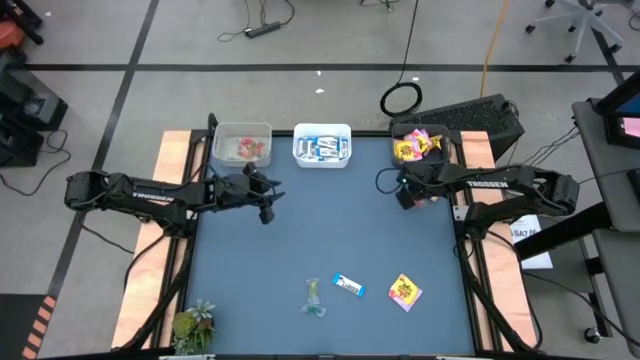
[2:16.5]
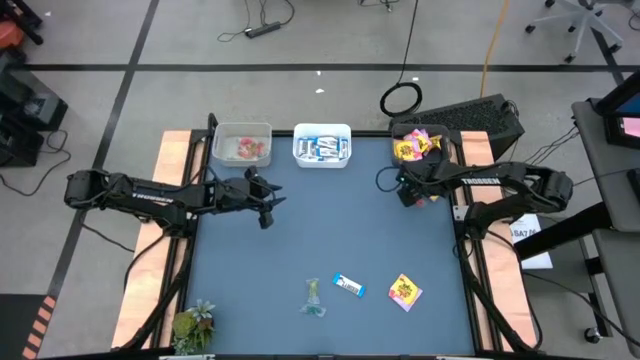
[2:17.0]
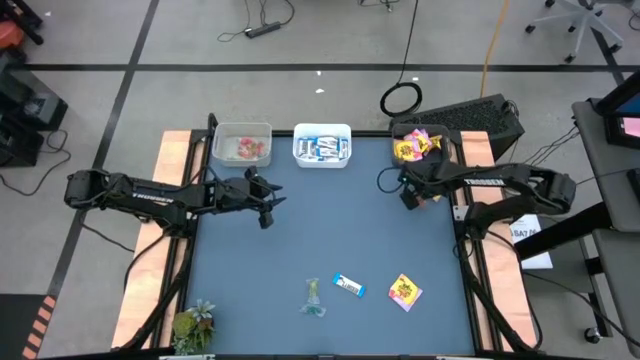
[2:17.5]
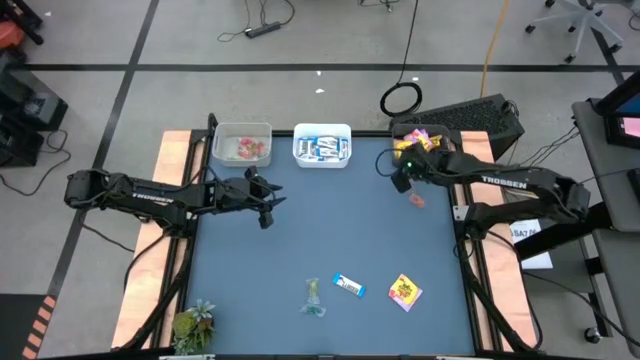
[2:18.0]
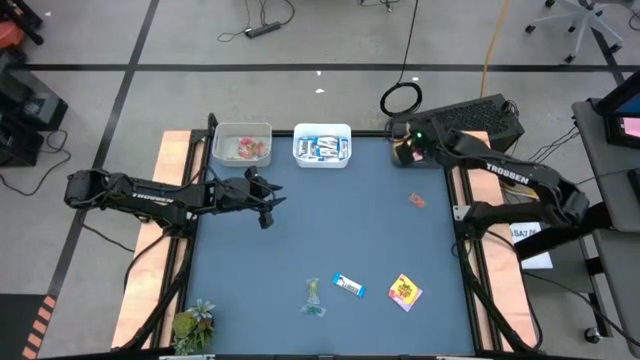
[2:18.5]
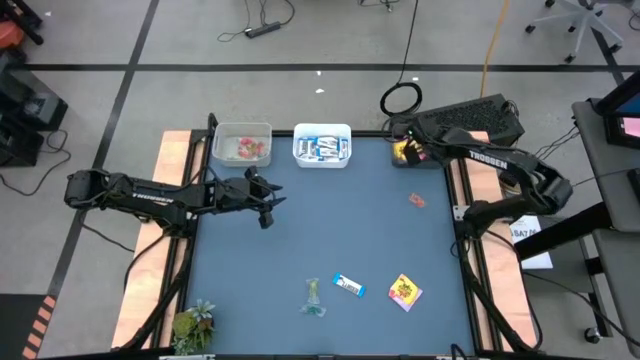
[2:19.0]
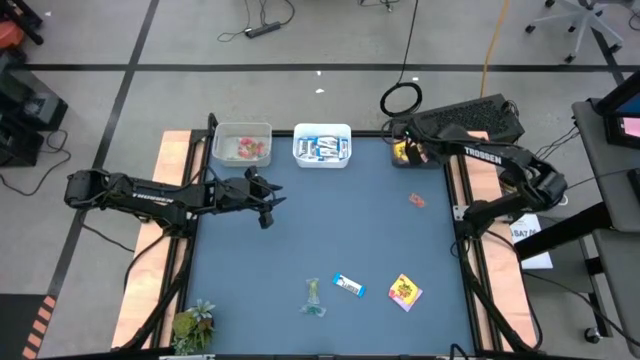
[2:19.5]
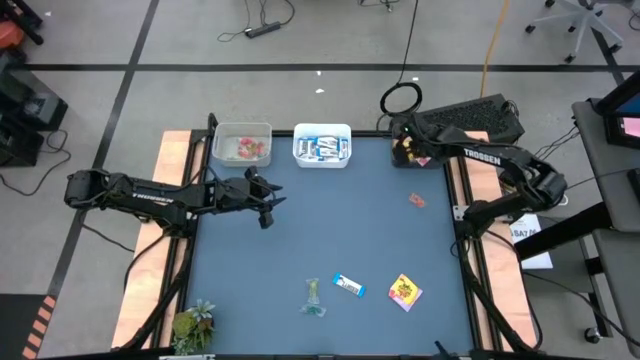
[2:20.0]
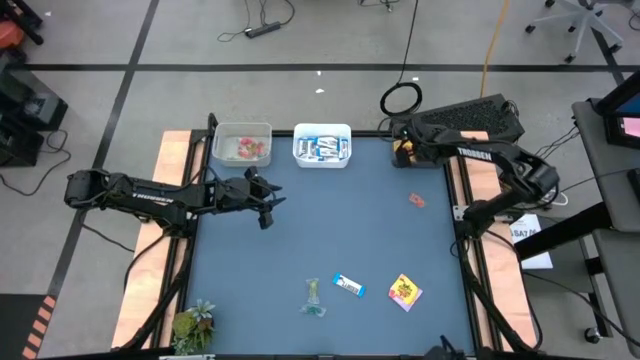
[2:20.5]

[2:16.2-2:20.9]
Task: Sort candy
Put the yellow candy into the black bin

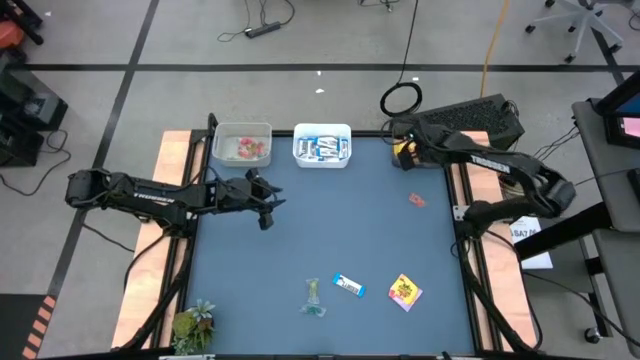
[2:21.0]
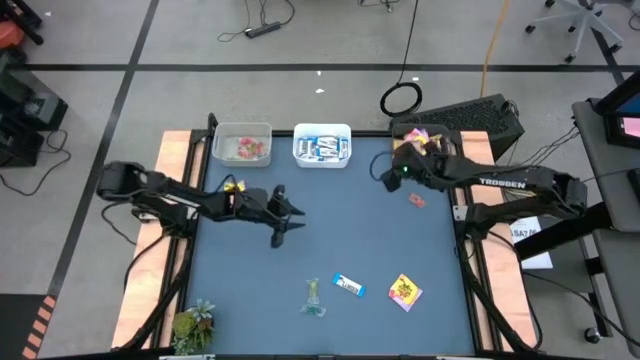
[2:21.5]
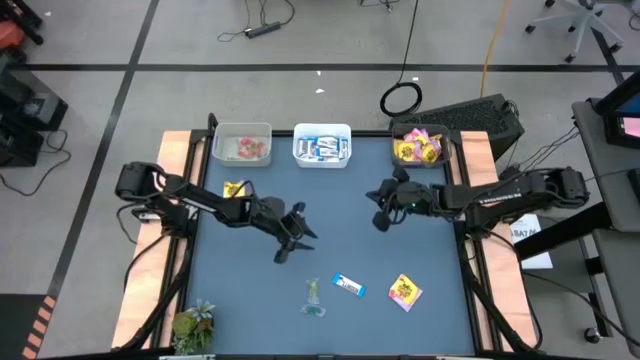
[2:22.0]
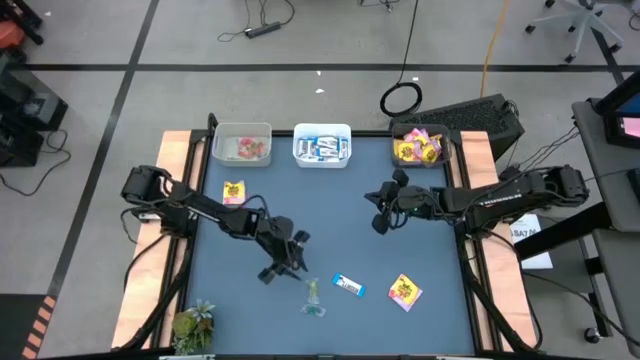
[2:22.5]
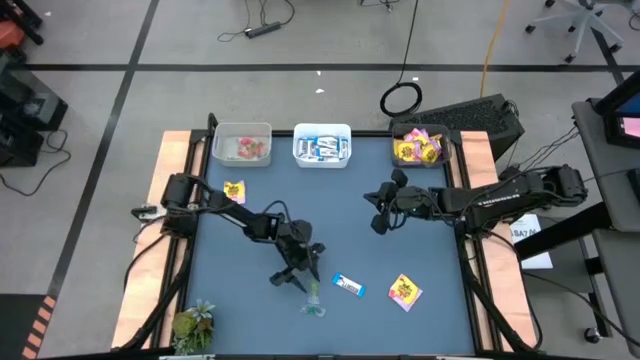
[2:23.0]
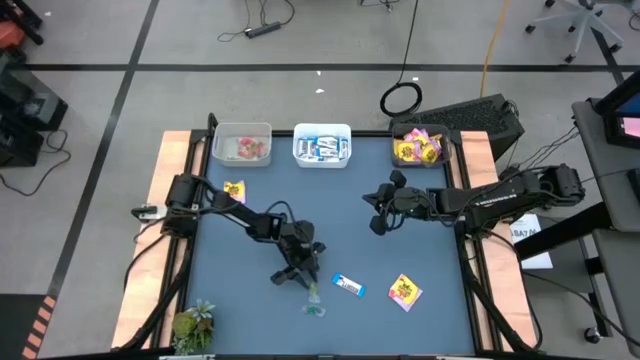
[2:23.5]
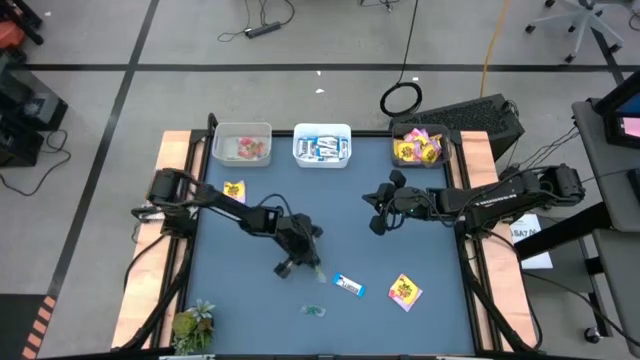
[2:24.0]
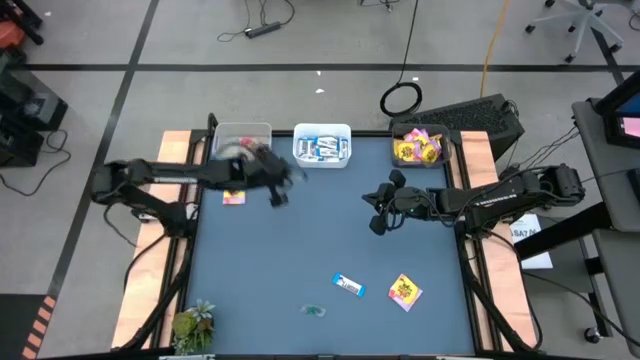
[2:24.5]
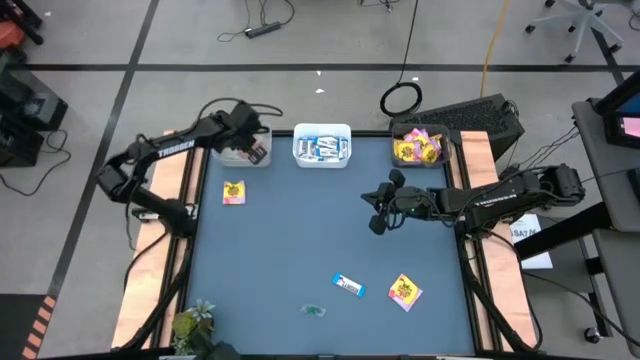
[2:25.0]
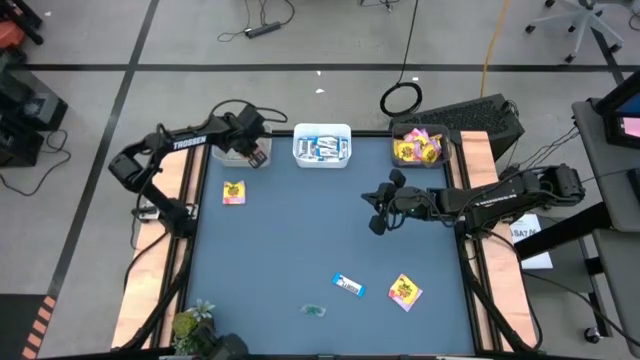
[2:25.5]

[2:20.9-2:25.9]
Put the green gummy into the gray bin

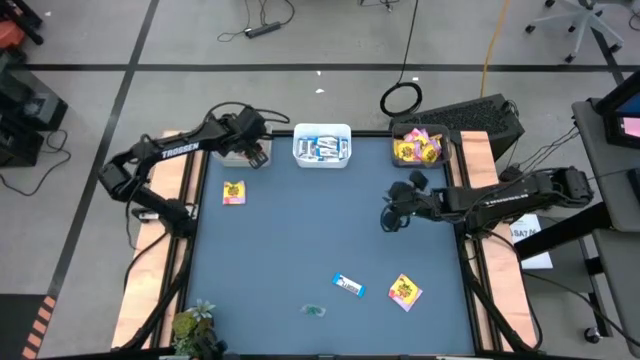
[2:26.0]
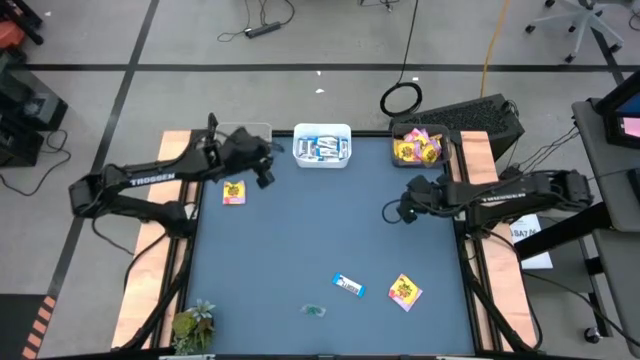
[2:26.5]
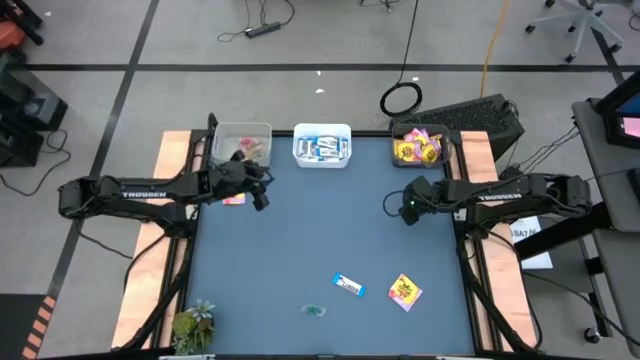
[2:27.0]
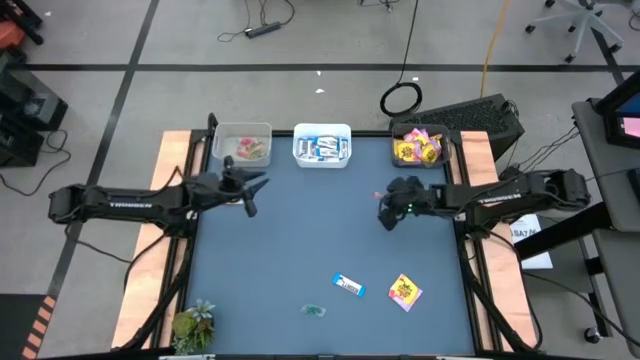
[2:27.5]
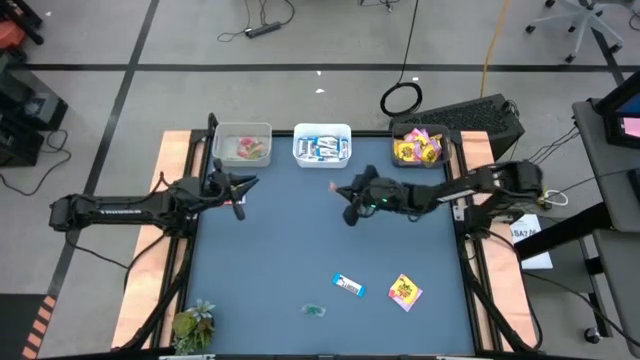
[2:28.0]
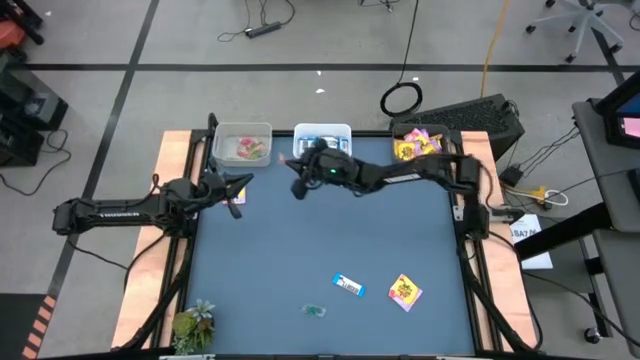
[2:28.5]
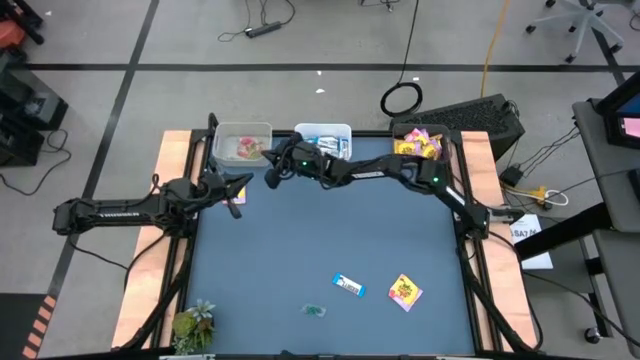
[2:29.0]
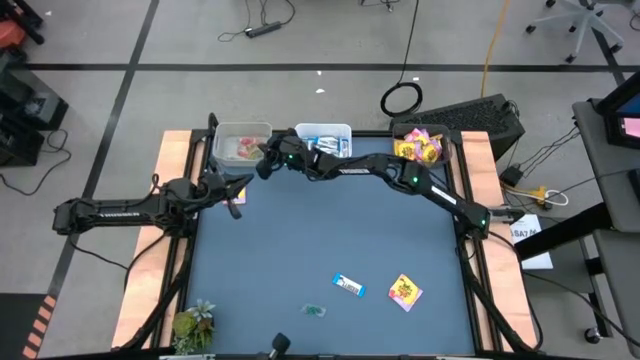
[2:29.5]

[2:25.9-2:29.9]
Put the orange gummy into the gray bin

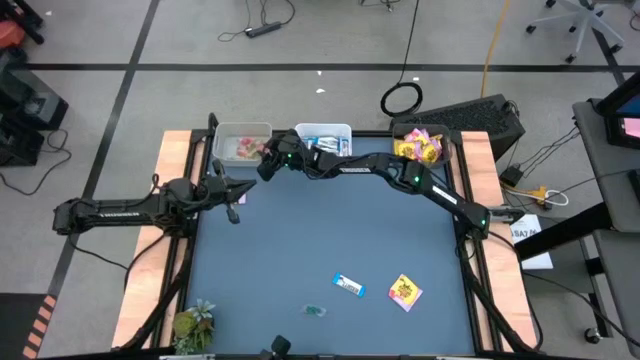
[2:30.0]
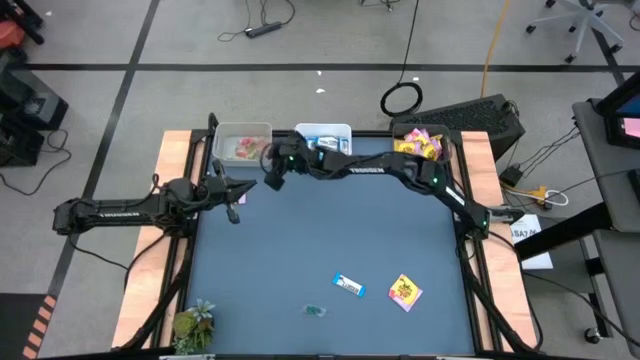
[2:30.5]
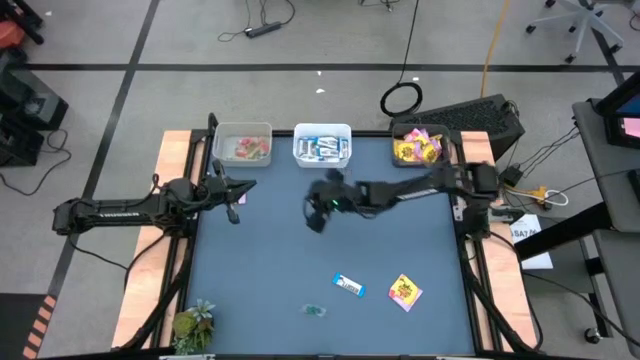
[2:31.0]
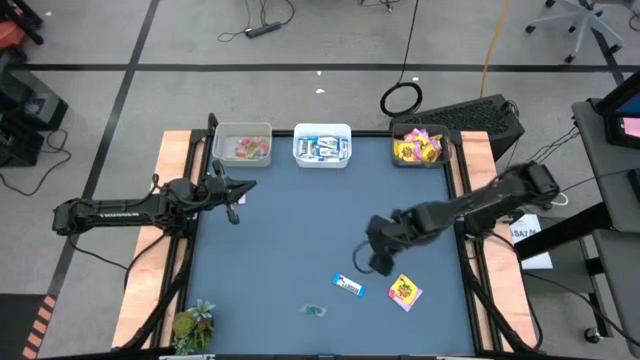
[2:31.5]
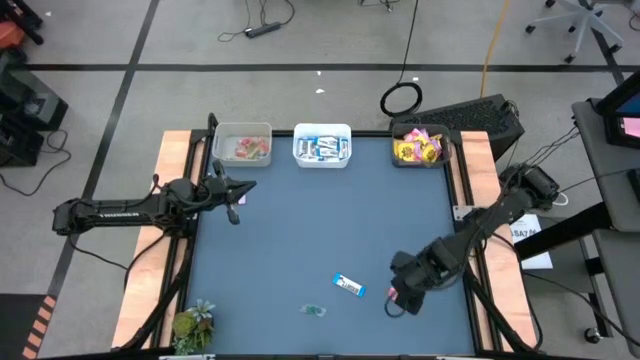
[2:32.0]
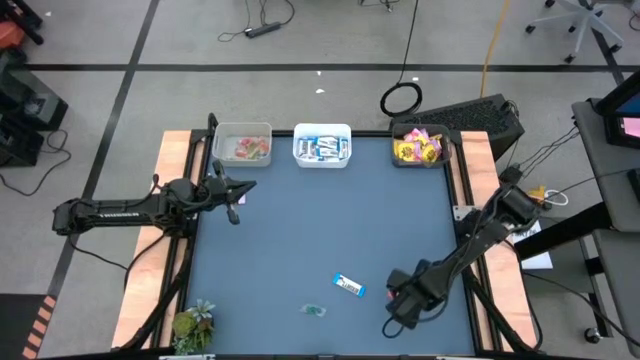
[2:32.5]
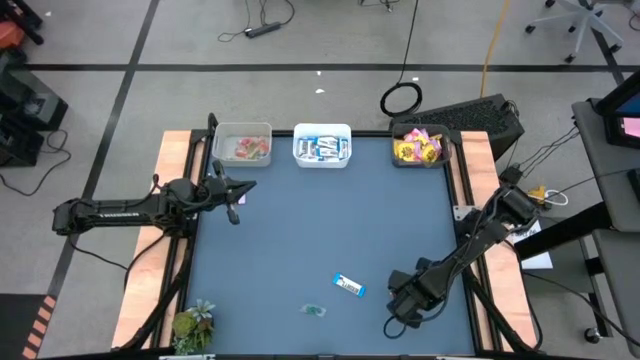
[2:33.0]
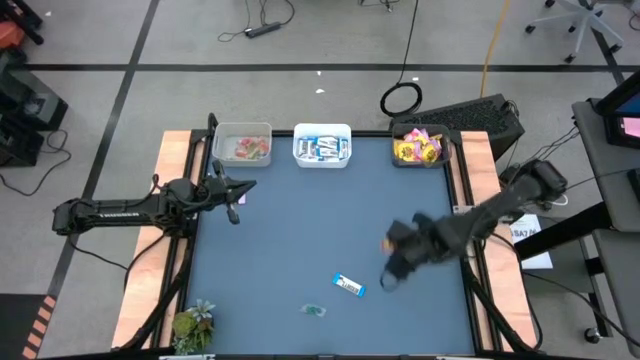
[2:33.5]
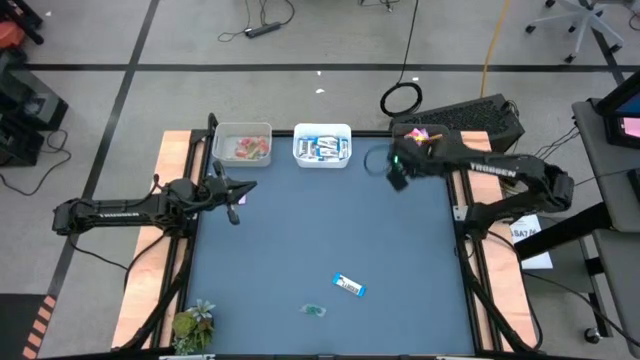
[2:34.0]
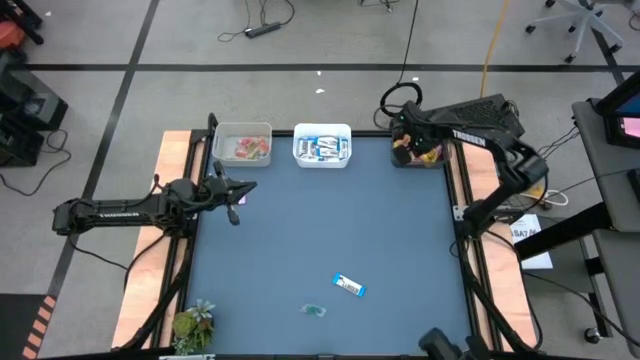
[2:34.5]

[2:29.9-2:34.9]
Put the yellow candy into the black bin

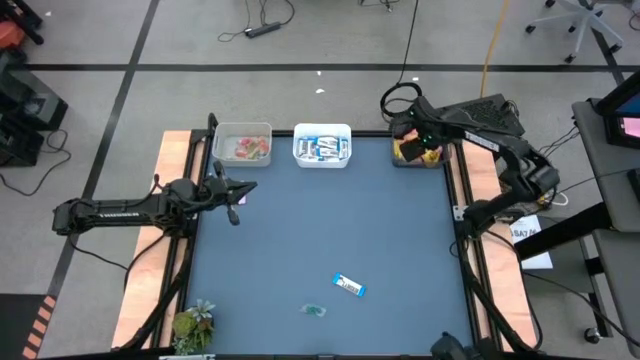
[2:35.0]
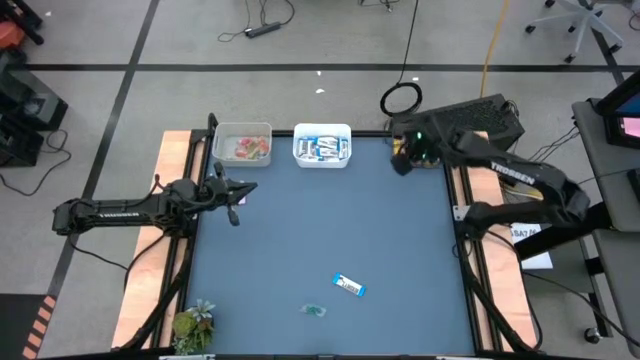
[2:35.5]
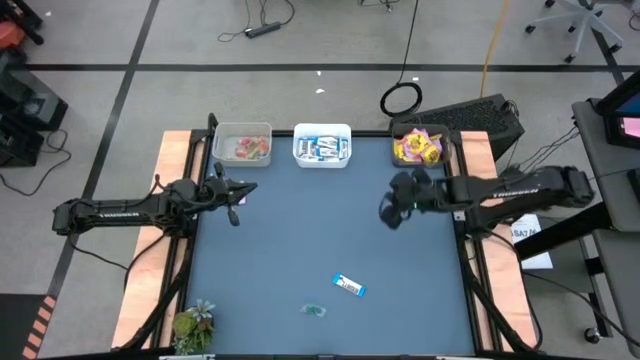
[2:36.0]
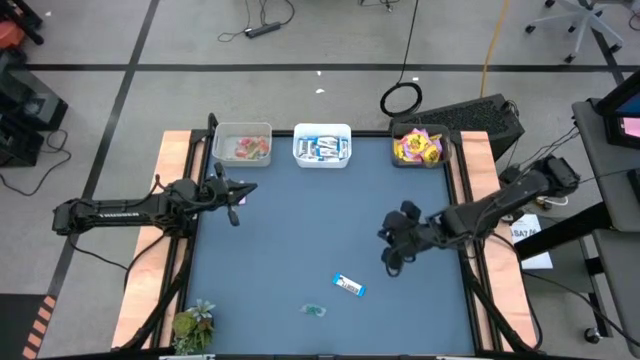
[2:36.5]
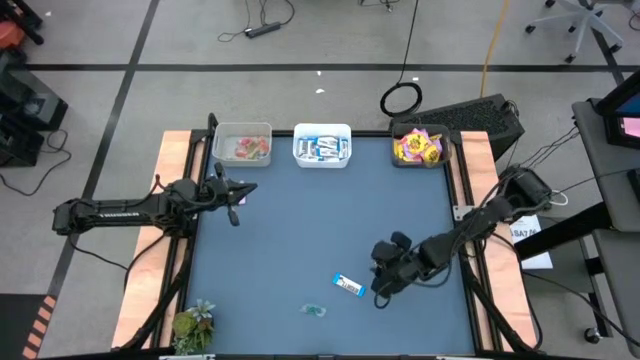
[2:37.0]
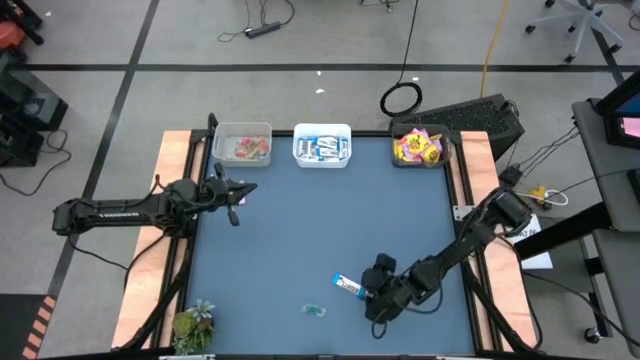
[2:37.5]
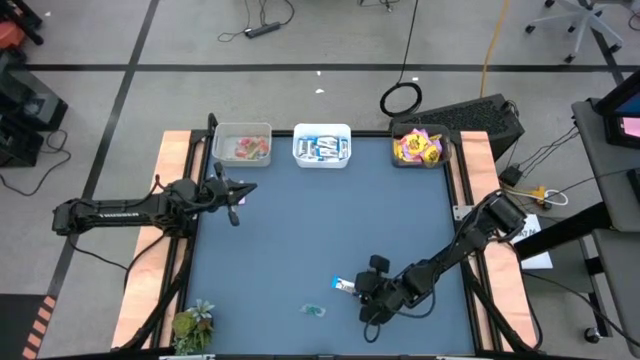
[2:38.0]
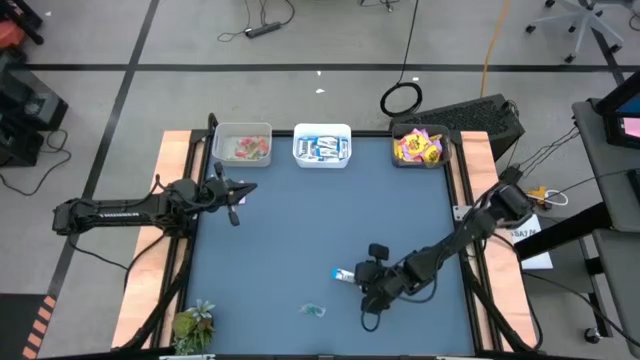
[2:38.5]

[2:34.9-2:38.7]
Put the white chocolate into the white bin
